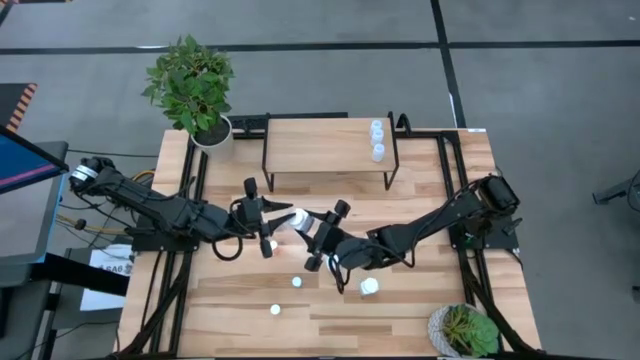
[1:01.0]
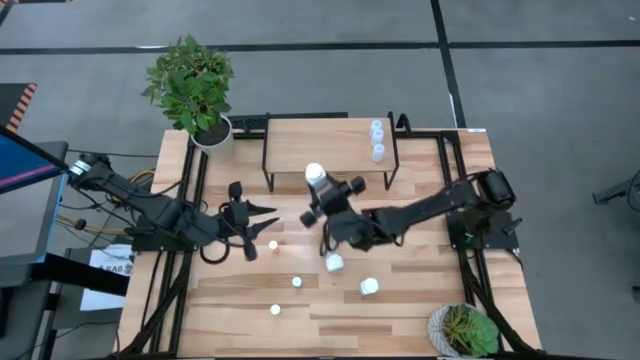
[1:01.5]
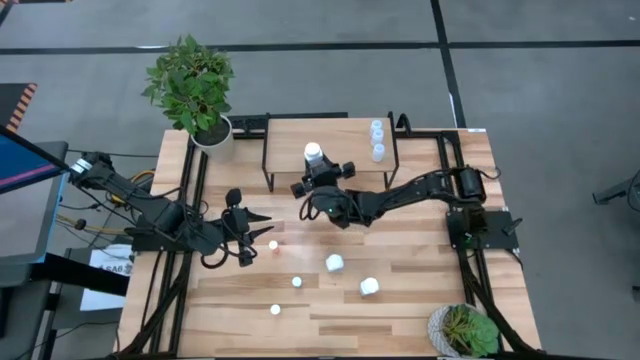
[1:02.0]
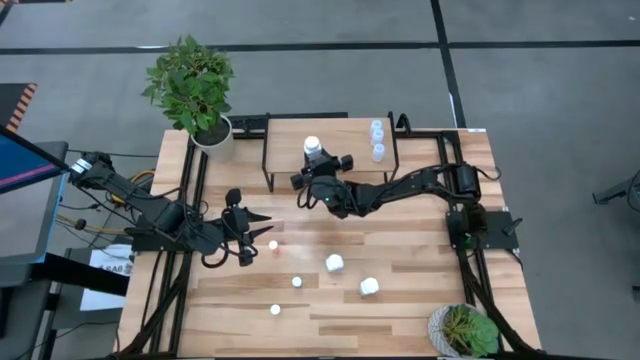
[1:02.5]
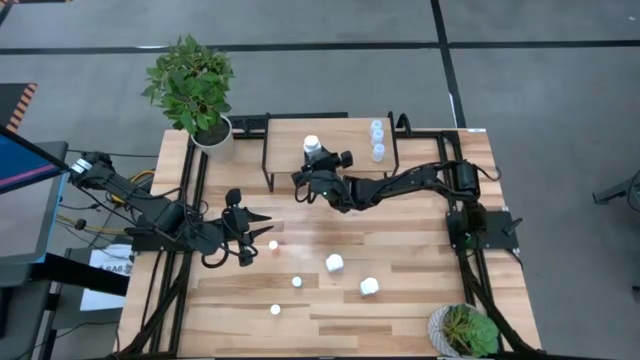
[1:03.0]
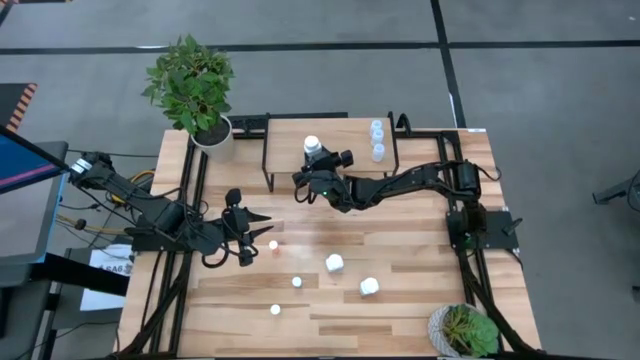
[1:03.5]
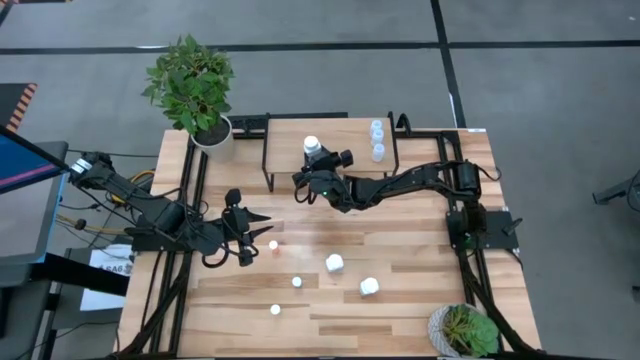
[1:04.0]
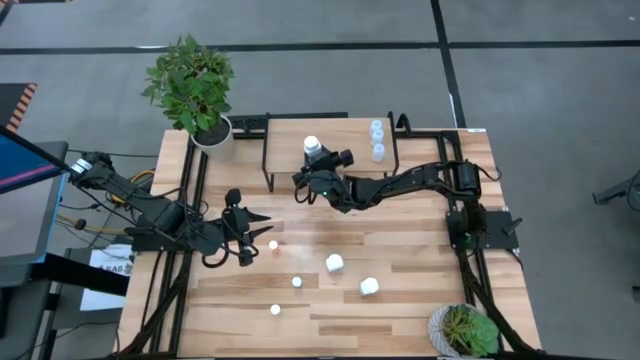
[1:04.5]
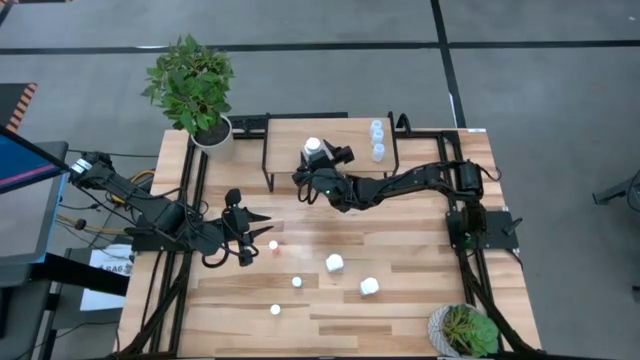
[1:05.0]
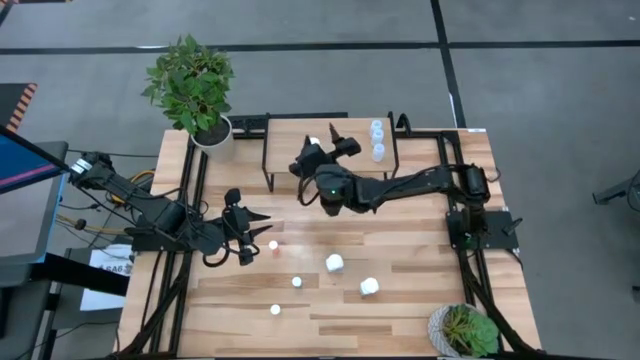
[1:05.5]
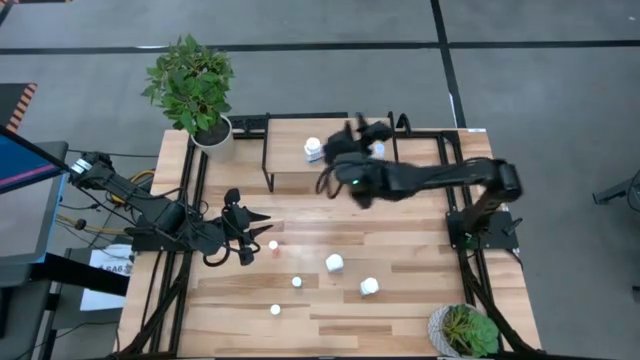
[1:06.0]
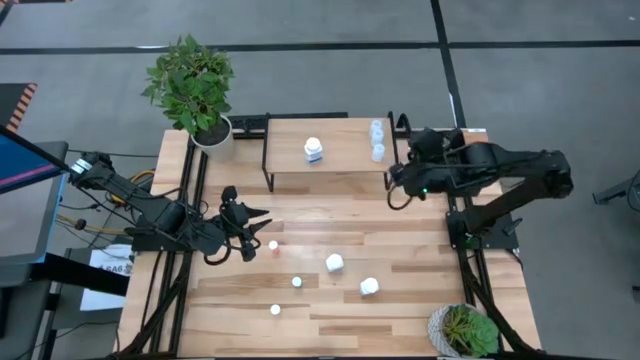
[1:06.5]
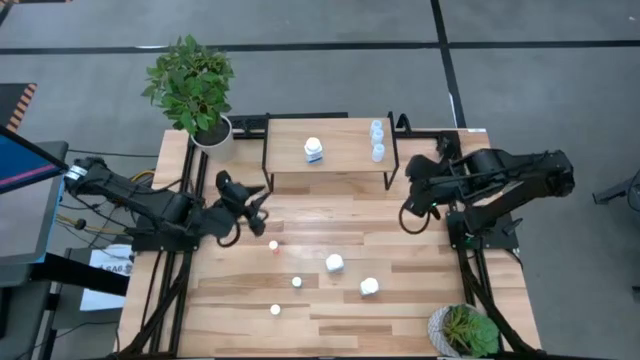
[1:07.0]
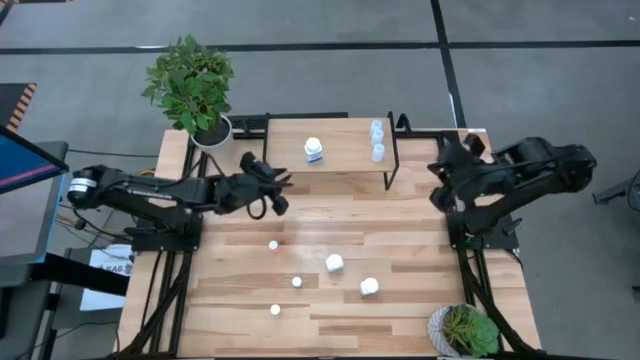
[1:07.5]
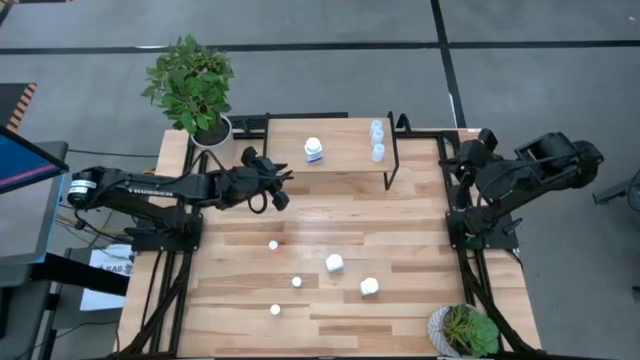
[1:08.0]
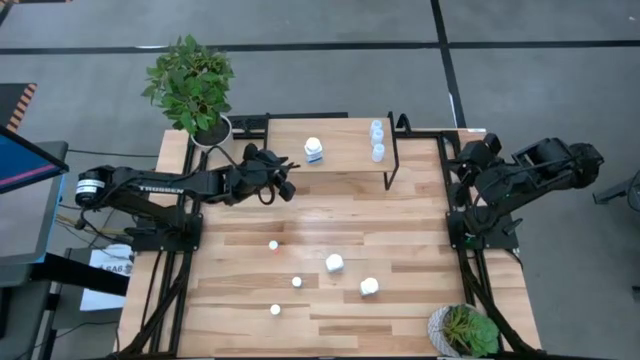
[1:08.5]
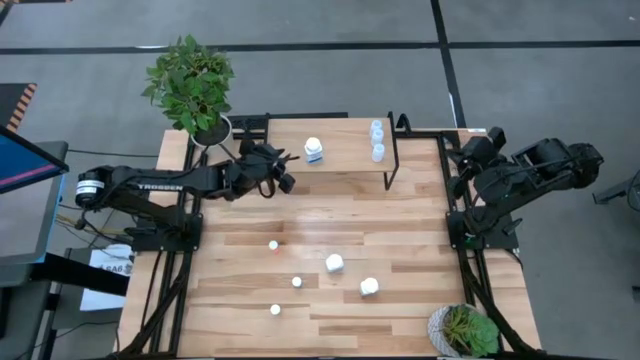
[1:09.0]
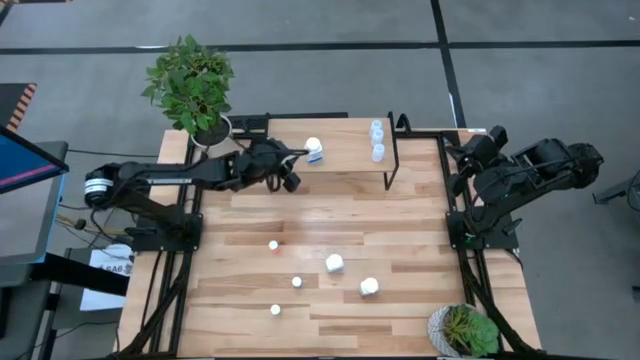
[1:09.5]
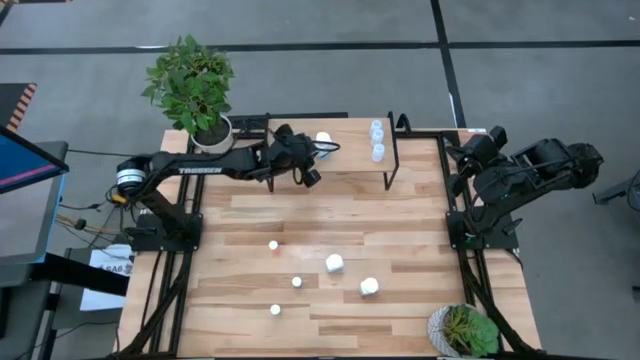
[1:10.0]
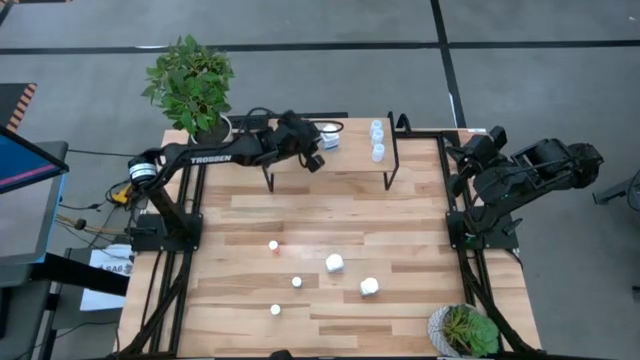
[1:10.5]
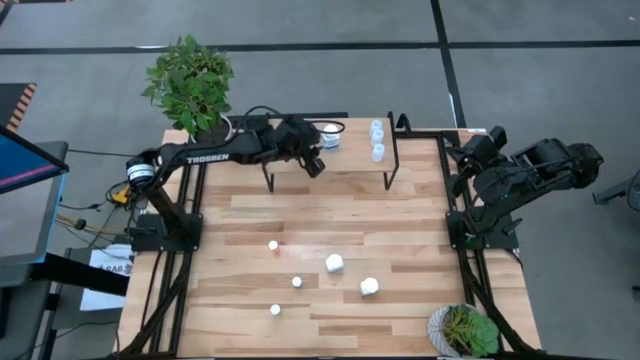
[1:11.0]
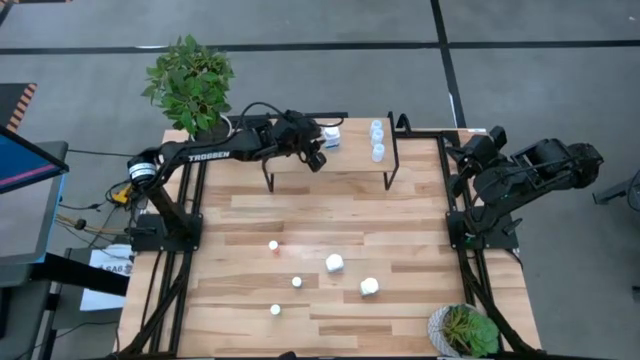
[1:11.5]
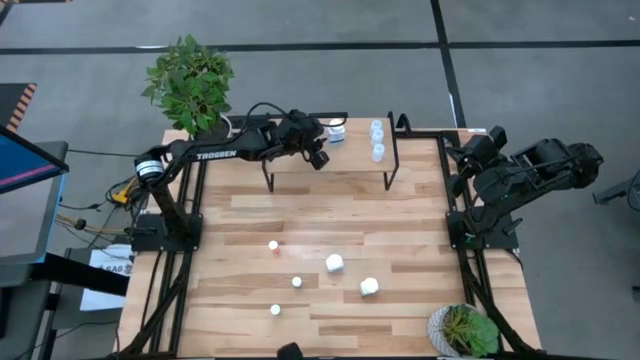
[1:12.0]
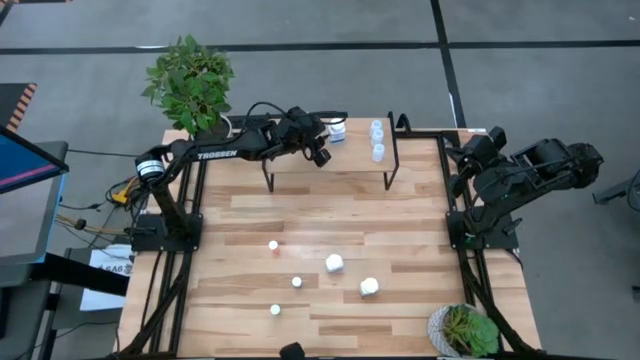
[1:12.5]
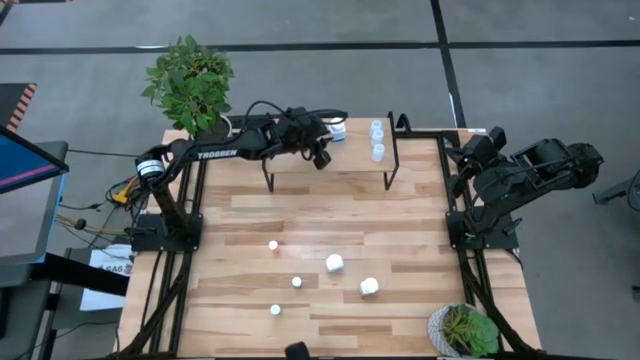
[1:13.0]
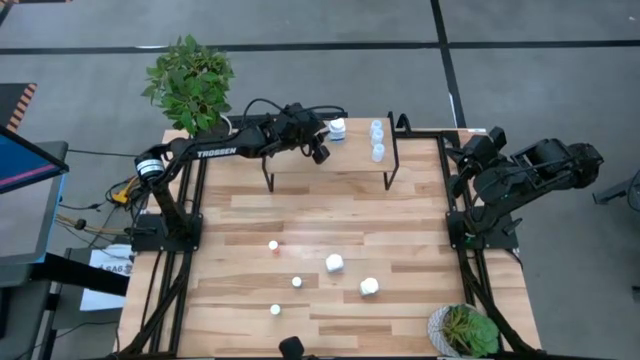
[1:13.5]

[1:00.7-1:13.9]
Task: Pick and place medicine bottles onto shelf by color
Put the top white medicine bottle on the shelf

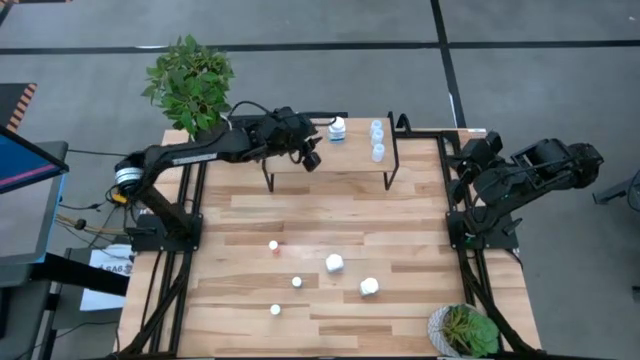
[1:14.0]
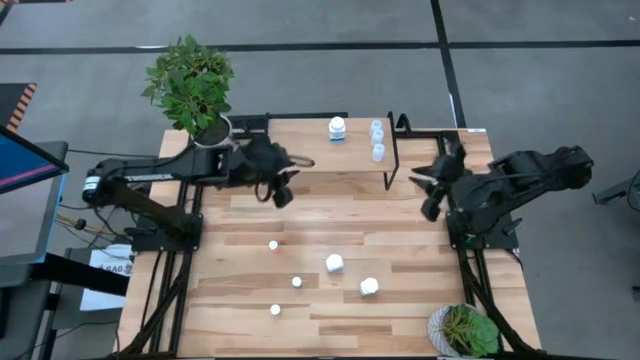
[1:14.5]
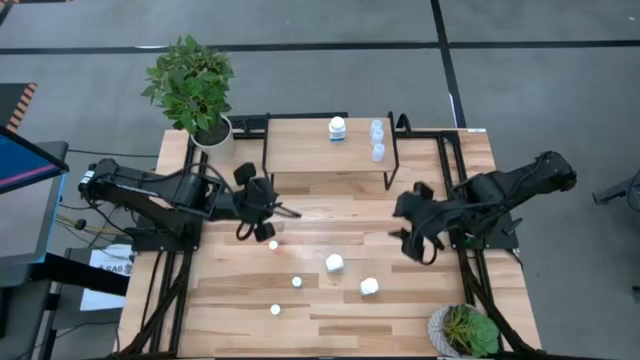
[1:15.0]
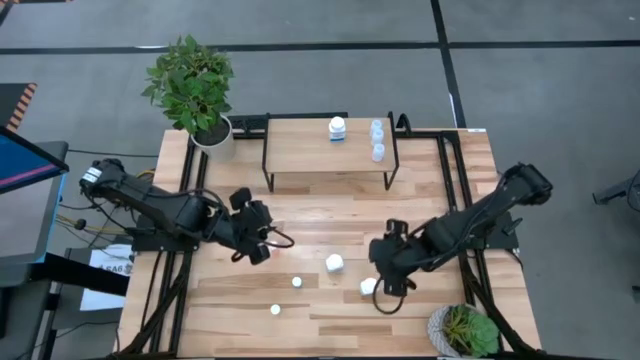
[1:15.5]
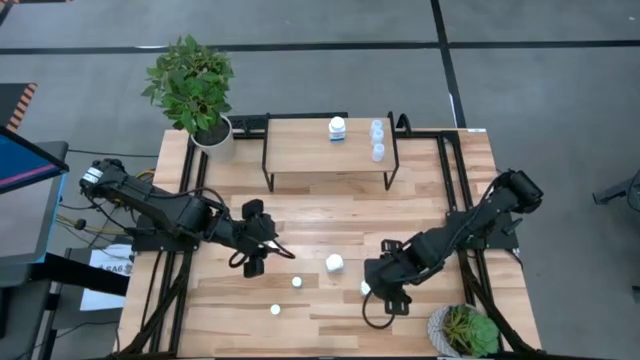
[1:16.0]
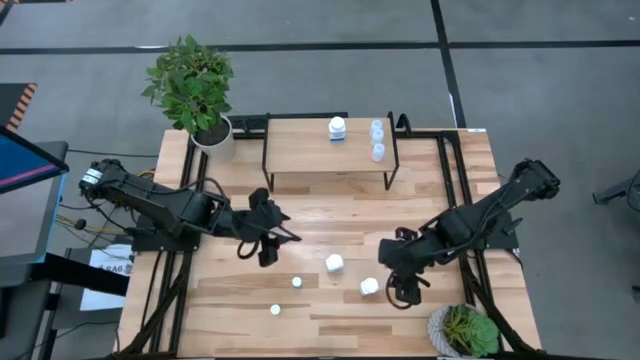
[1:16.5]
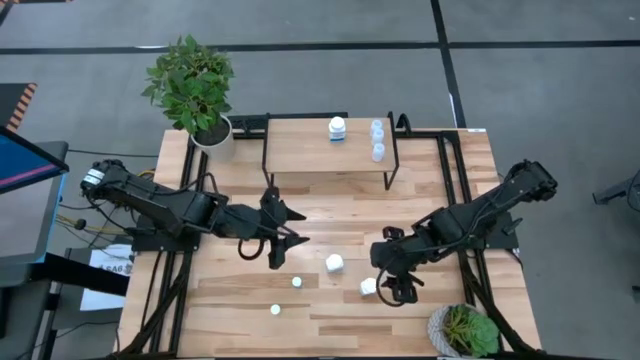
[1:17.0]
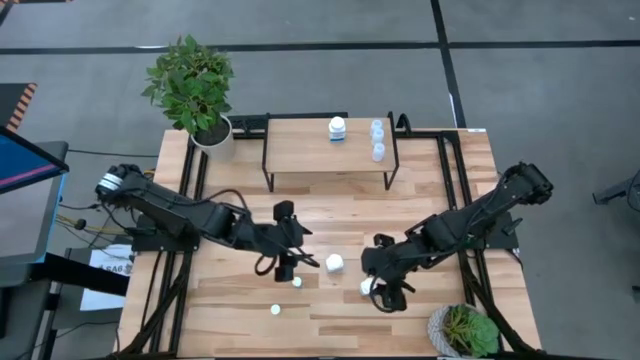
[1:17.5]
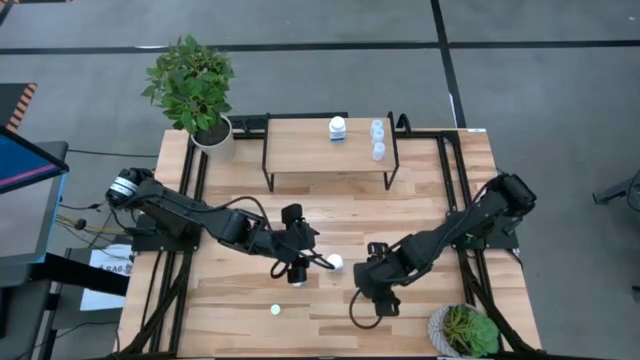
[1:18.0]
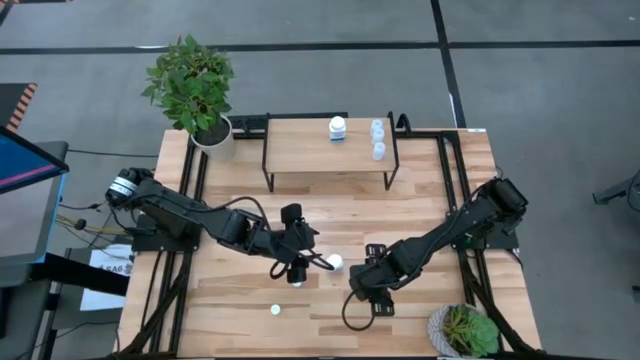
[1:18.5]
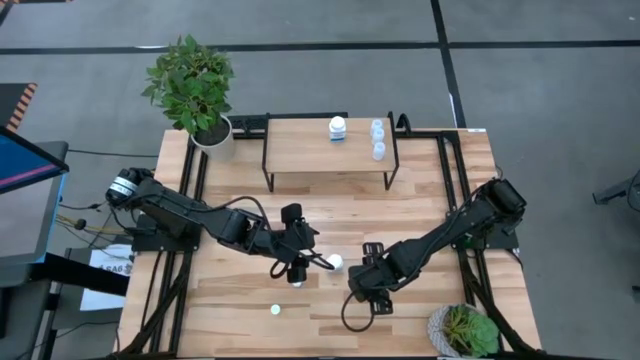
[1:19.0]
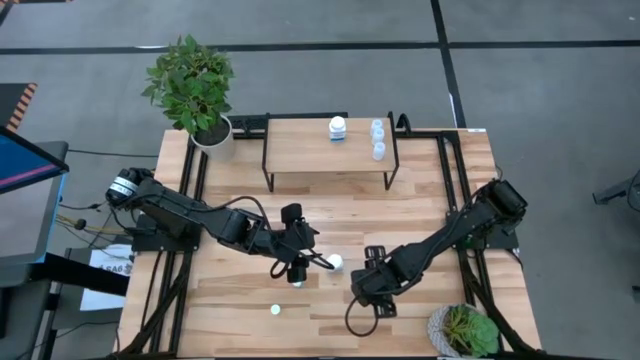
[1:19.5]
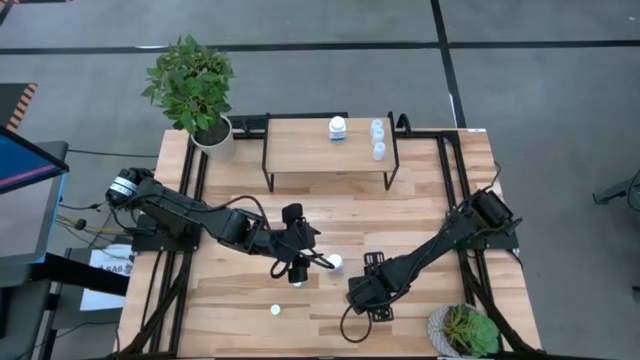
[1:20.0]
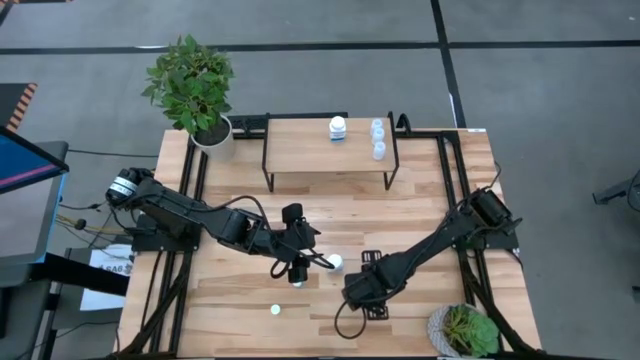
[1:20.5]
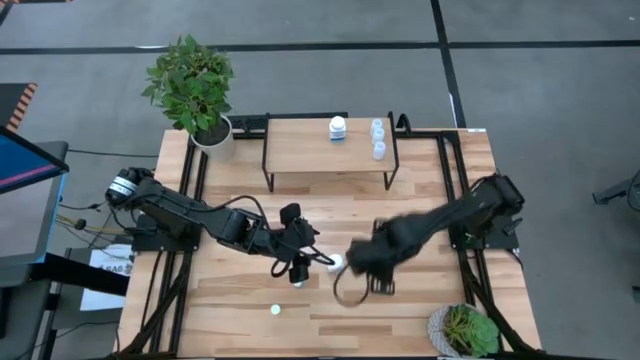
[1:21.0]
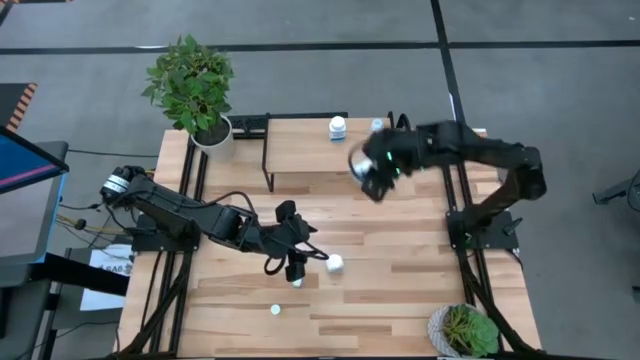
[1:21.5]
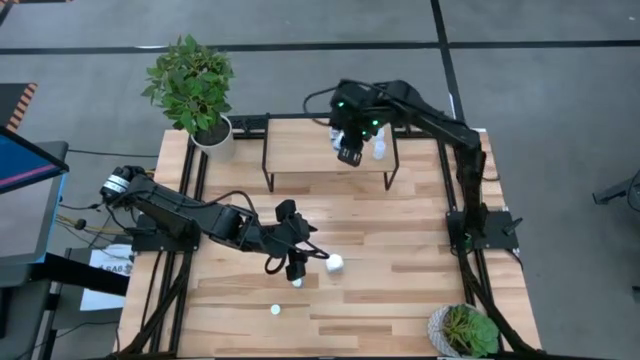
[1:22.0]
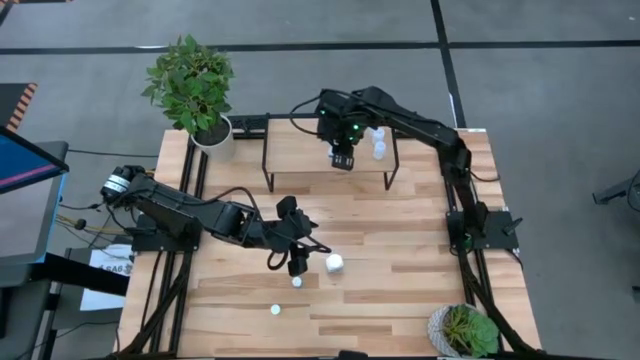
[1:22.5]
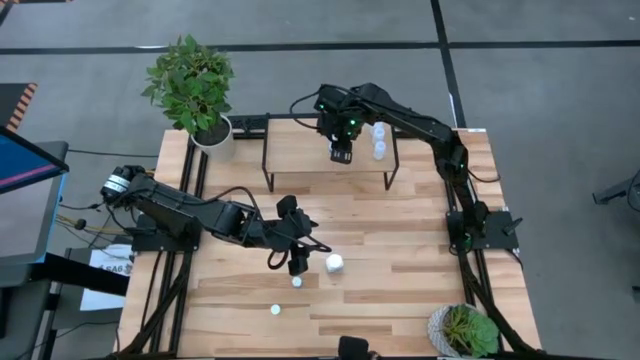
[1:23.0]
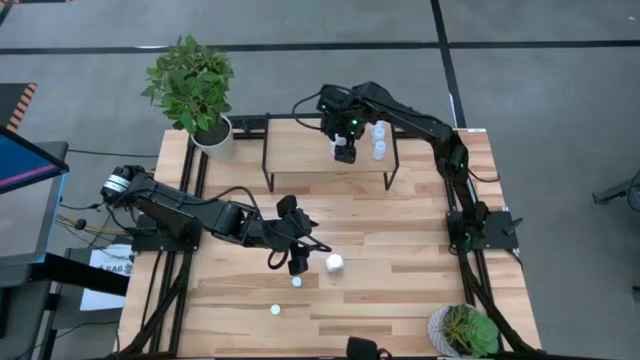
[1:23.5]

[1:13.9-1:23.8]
Put the right white medicine bottle on the shelf aligned with the other white medicine bottle
